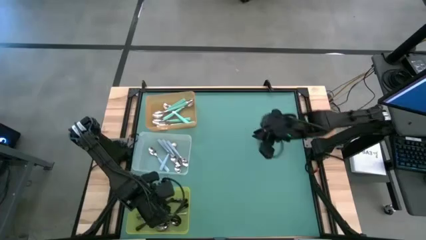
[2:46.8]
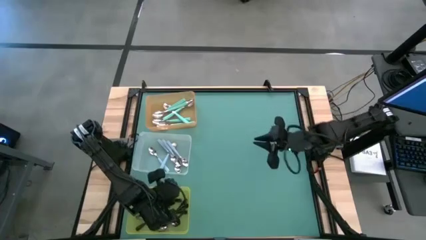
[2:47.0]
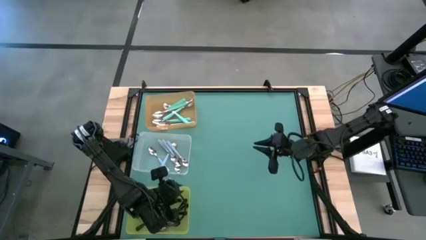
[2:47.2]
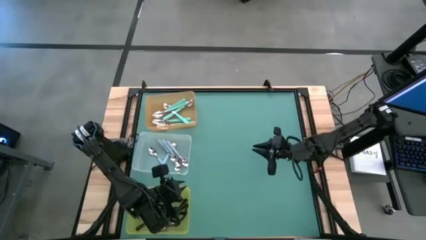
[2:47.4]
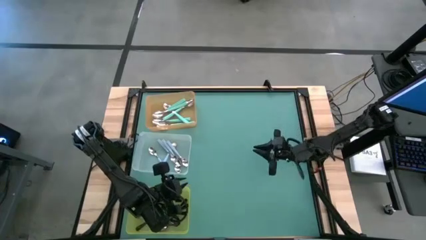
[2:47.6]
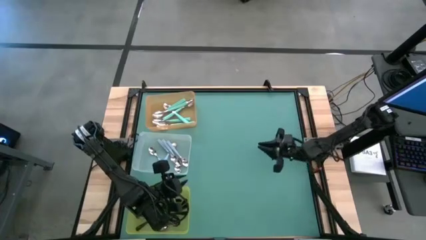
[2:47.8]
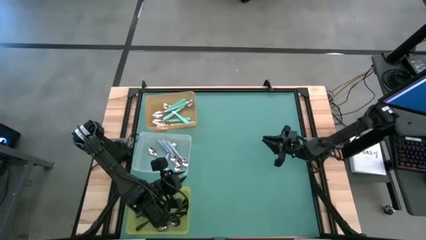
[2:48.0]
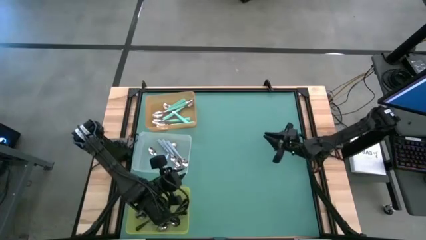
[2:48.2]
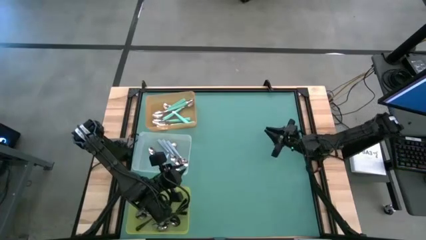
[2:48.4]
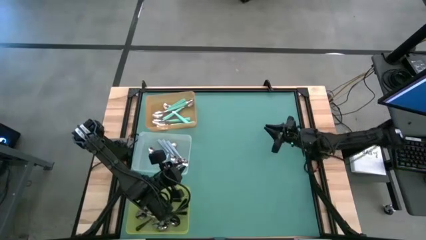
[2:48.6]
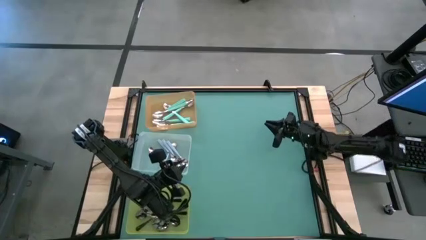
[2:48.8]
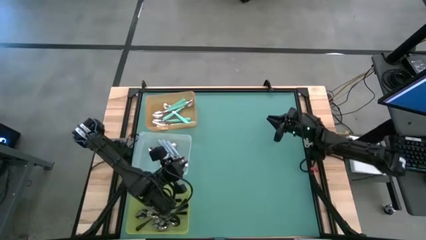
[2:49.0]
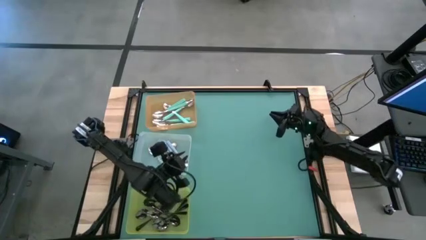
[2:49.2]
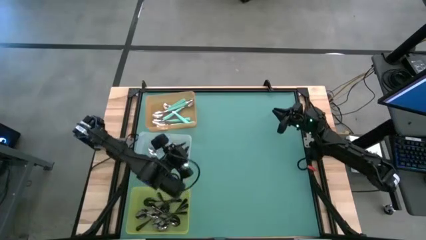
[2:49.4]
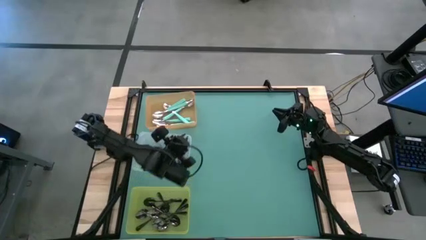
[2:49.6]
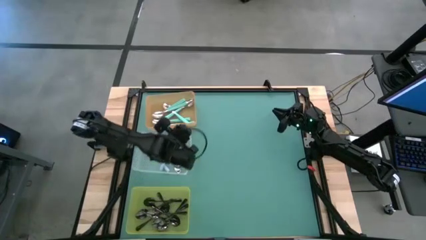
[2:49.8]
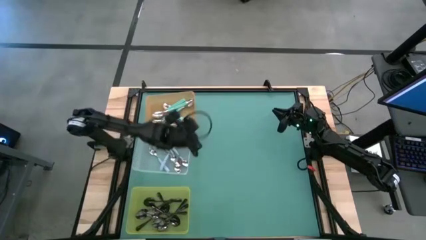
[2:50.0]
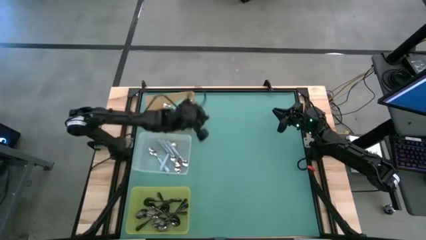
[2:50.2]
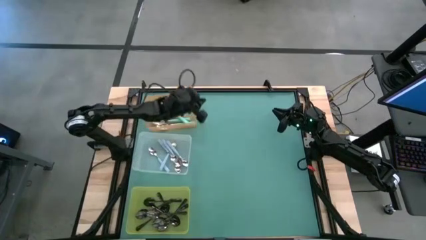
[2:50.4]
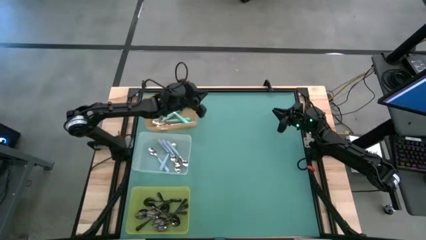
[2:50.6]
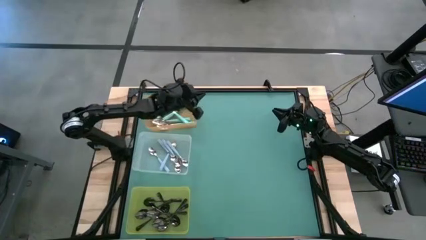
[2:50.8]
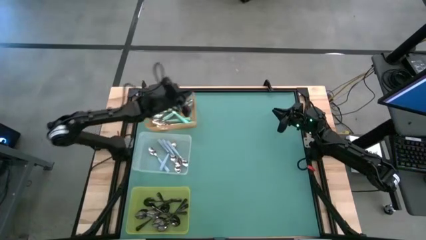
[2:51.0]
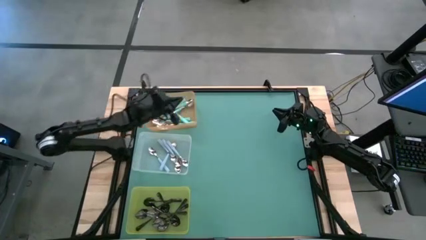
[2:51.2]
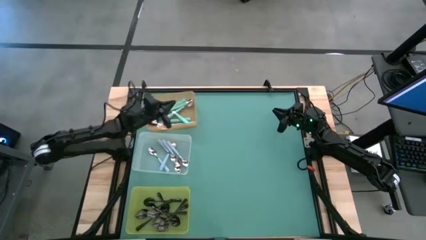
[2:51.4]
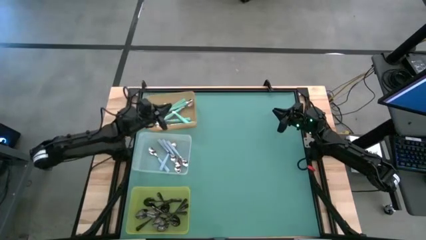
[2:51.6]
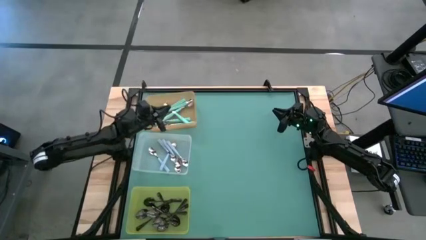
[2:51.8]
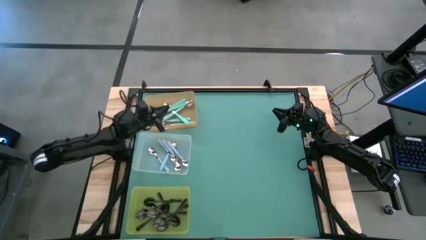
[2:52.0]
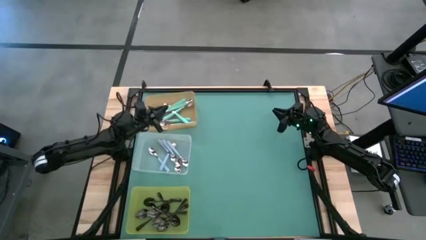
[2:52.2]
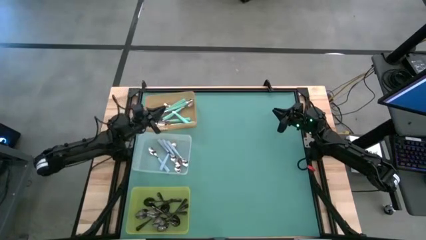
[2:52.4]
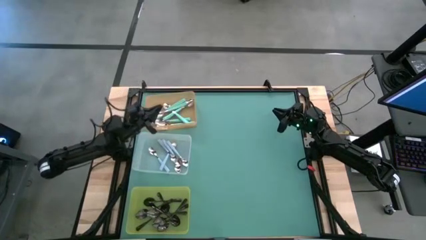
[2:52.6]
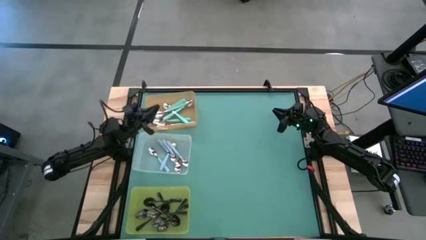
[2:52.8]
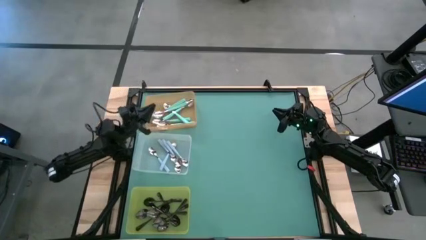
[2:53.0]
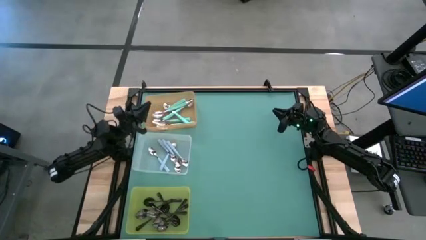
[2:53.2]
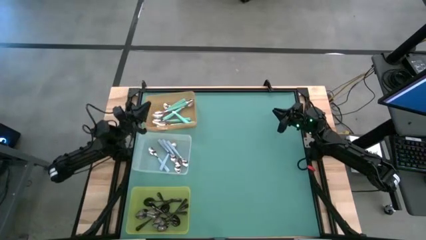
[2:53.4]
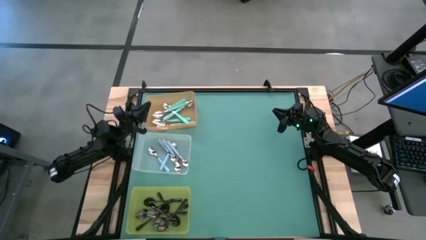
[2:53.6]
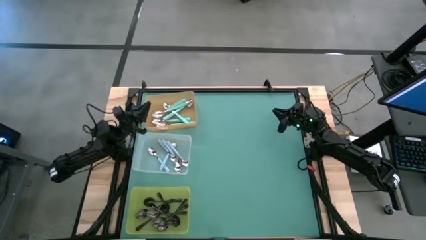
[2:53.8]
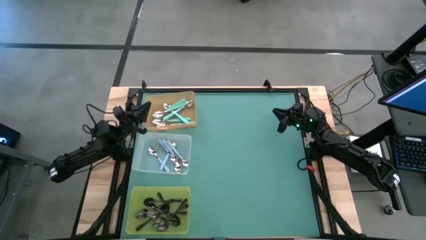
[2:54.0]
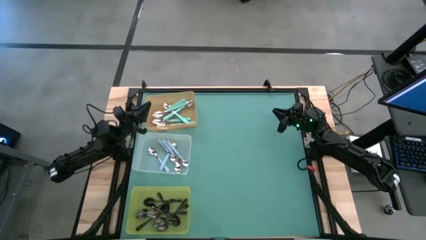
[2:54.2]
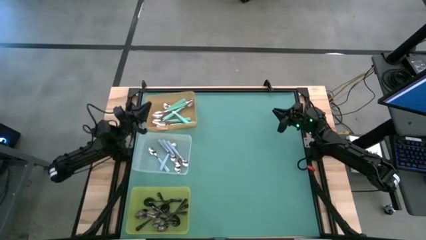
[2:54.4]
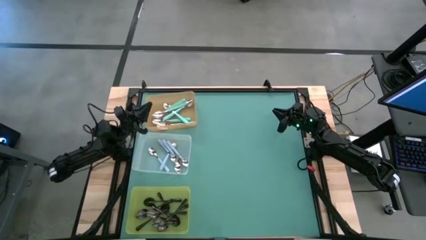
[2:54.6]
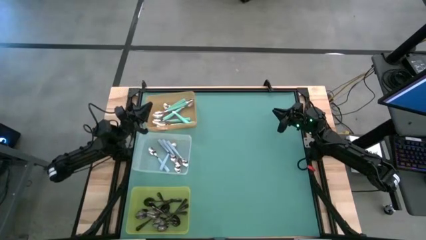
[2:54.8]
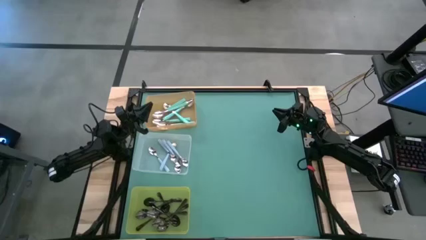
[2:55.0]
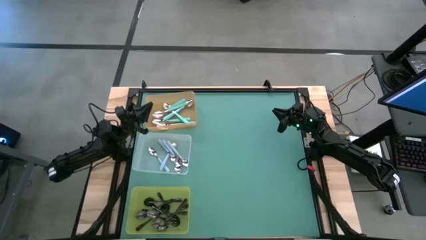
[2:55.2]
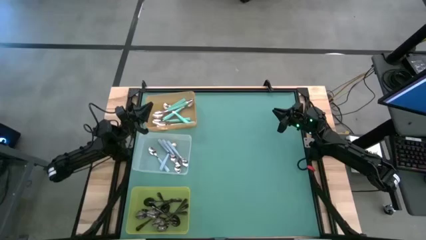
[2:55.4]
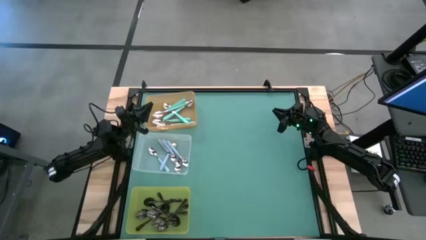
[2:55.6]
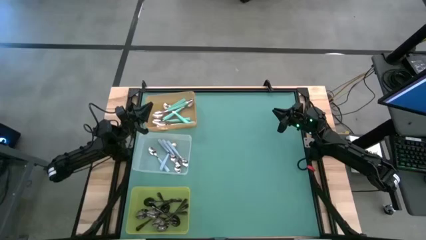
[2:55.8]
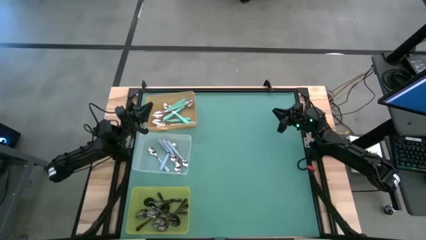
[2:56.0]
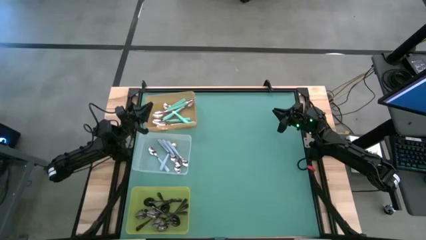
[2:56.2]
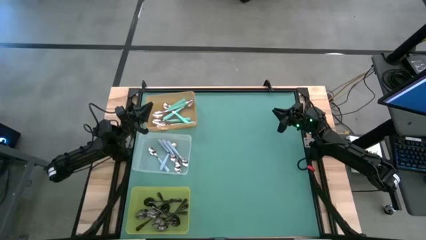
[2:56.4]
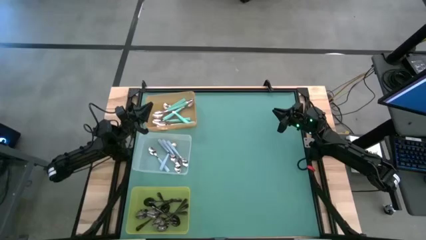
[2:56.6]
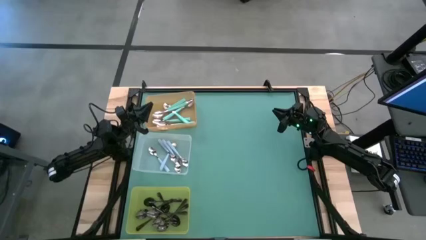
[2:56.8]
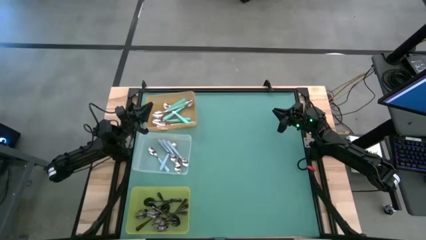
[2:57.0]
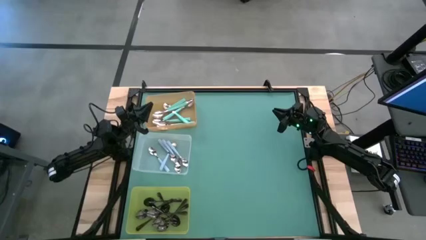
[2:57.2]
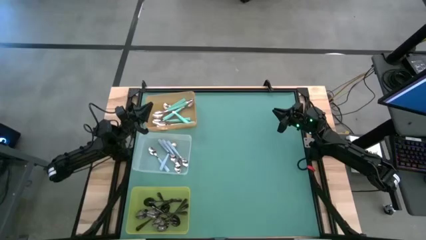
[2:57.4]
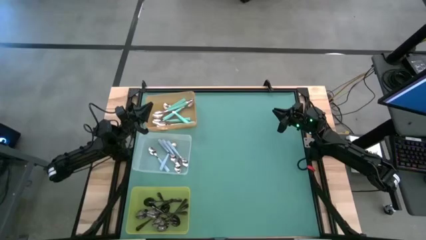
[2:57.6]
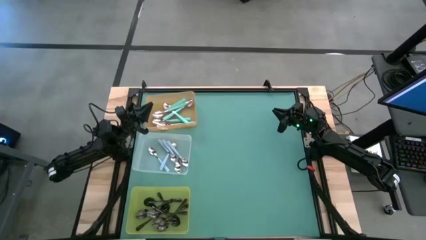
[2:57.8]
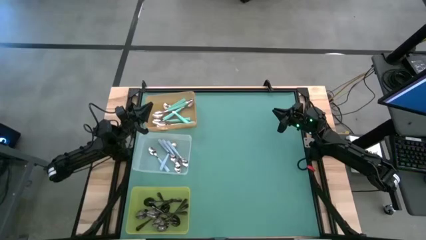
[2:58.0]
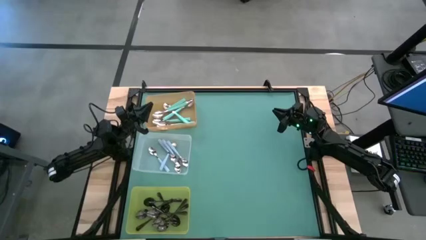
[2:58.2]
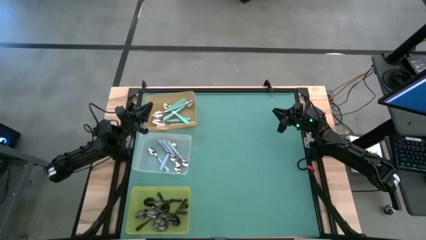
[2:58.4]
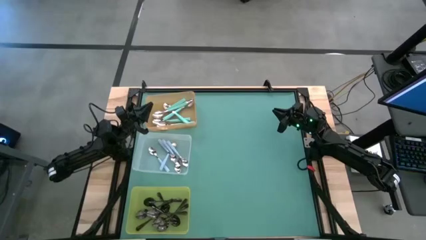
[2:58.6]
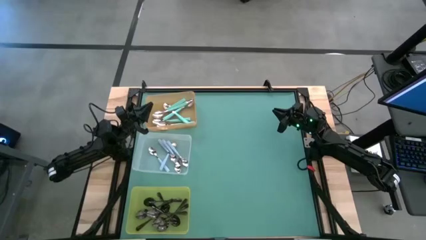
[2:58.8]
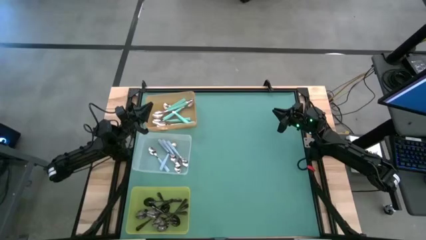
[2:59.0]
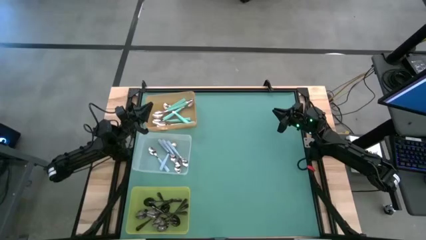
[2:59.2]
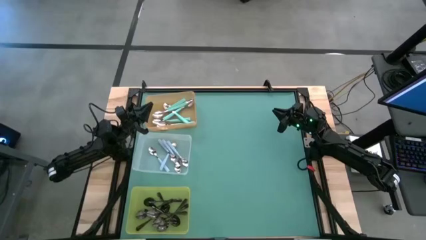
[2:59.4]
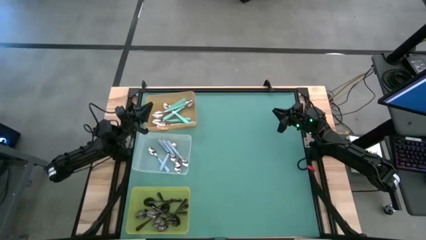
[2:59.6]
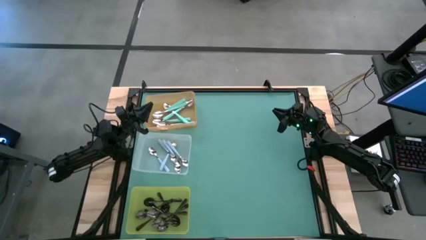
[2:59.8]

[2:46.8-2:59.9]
Task: Sort silverware by color (type)
Return to Home Position
